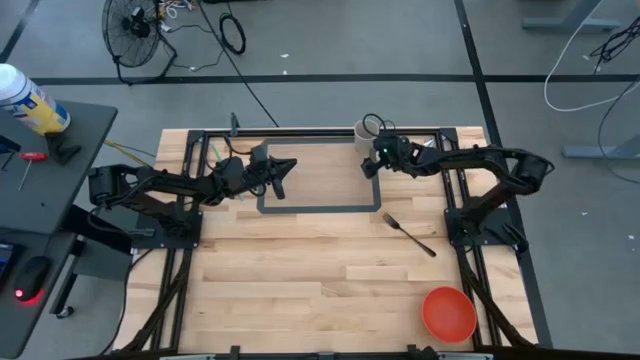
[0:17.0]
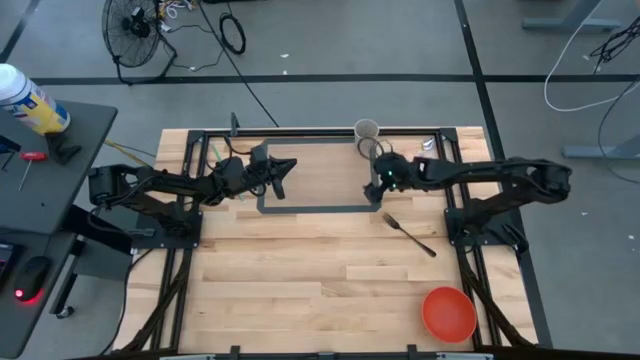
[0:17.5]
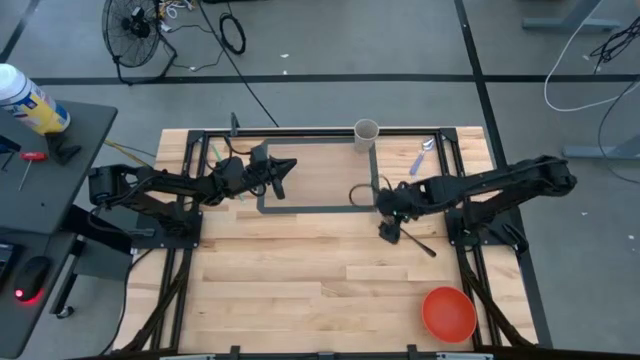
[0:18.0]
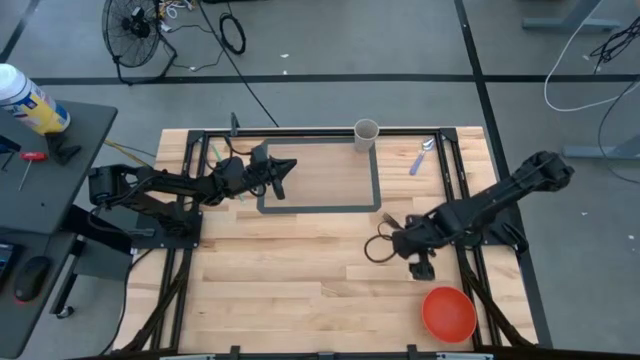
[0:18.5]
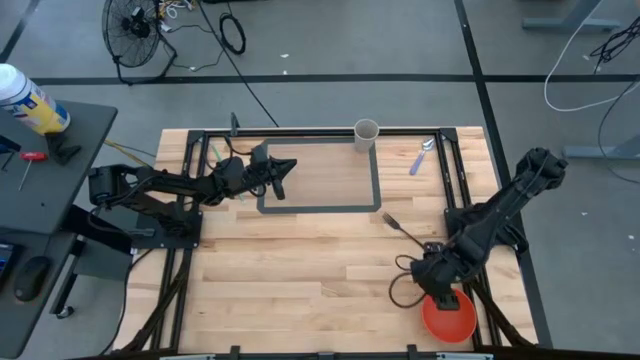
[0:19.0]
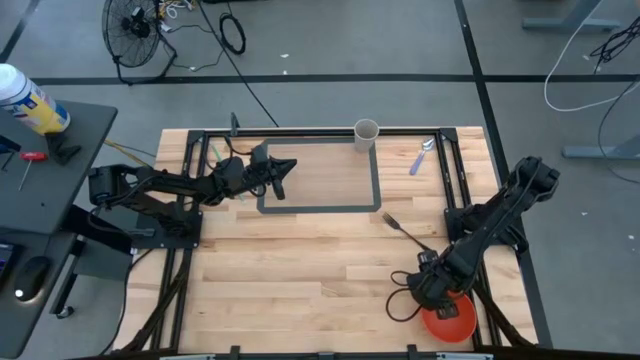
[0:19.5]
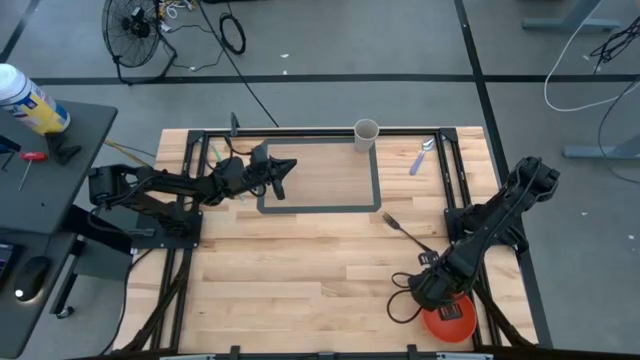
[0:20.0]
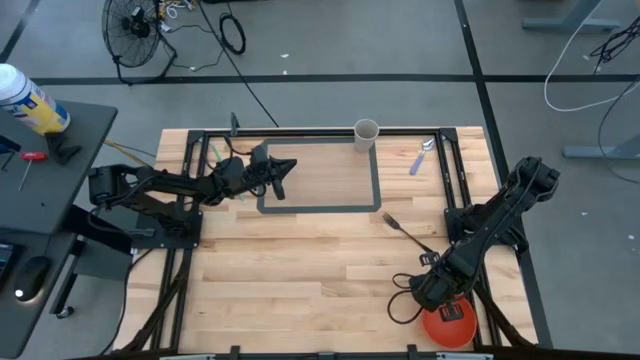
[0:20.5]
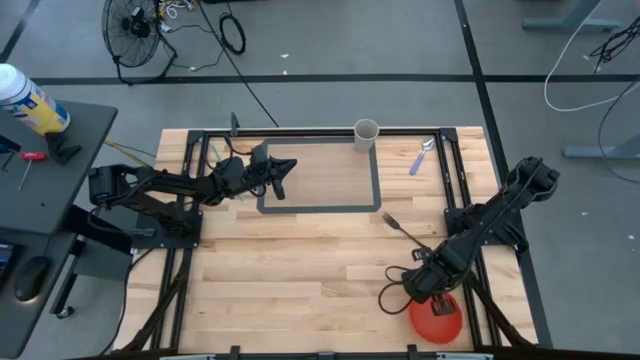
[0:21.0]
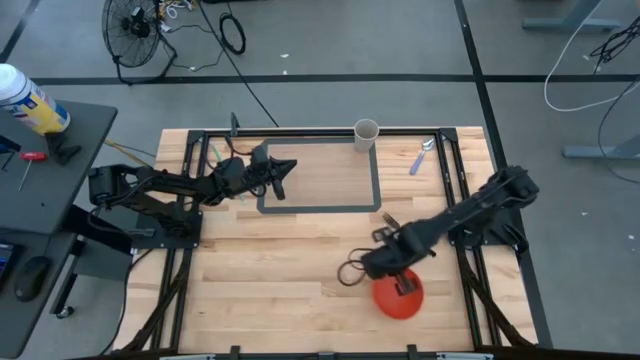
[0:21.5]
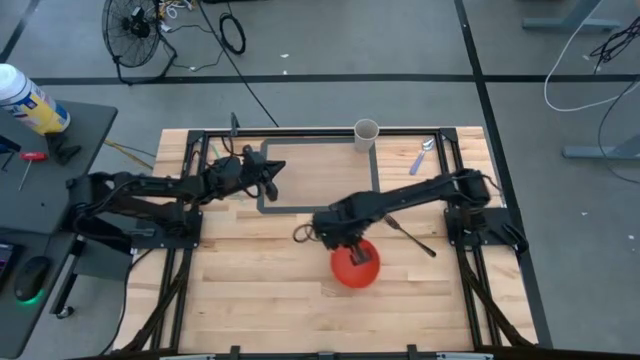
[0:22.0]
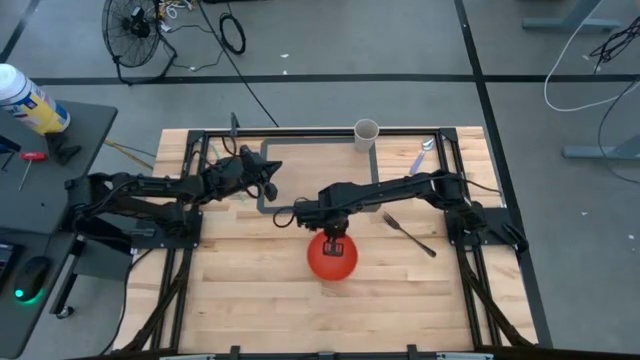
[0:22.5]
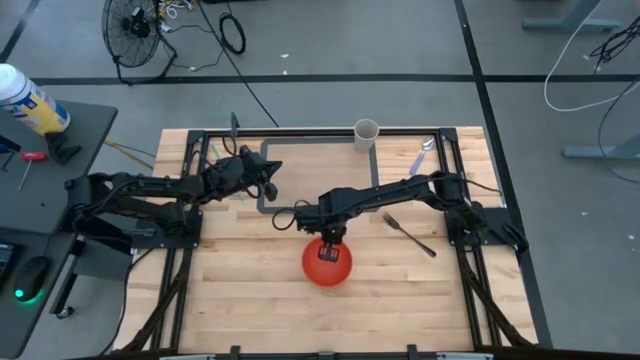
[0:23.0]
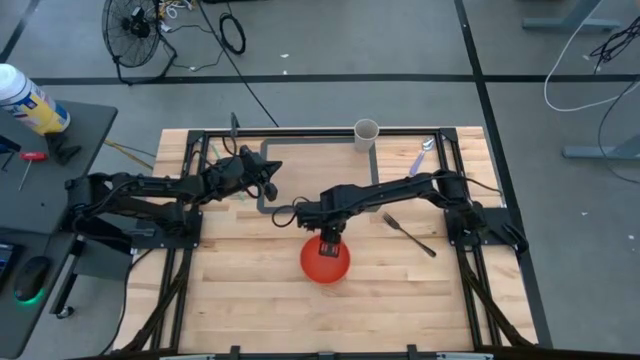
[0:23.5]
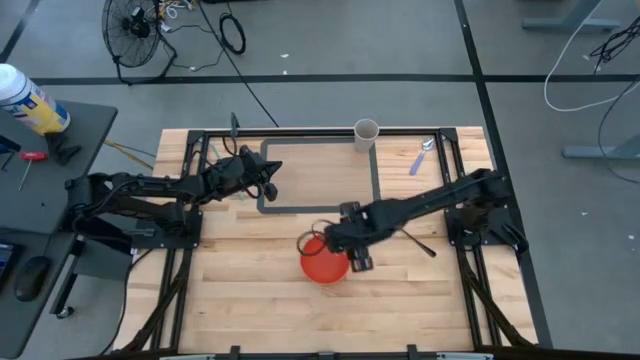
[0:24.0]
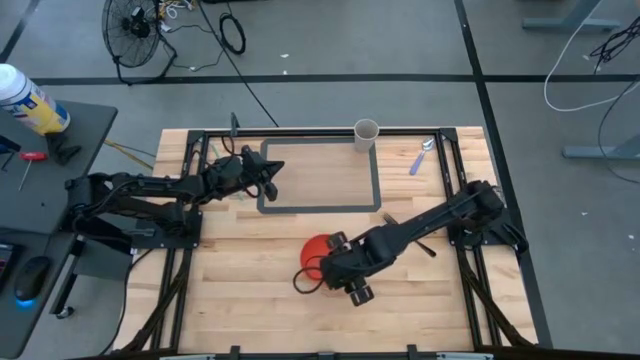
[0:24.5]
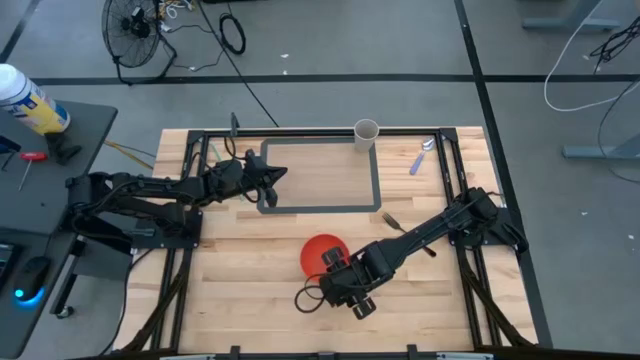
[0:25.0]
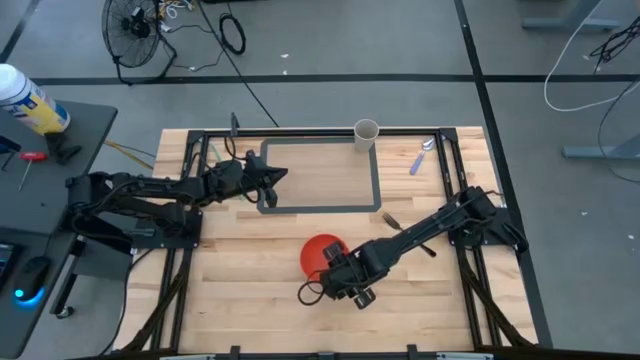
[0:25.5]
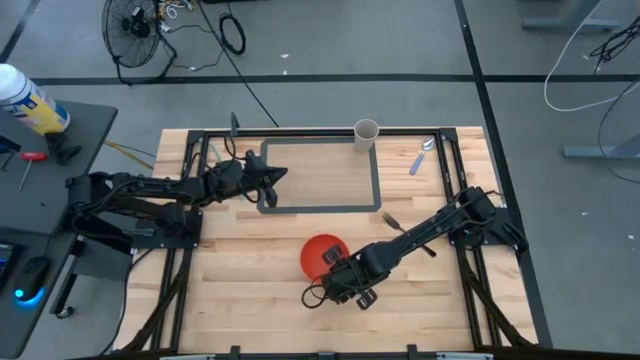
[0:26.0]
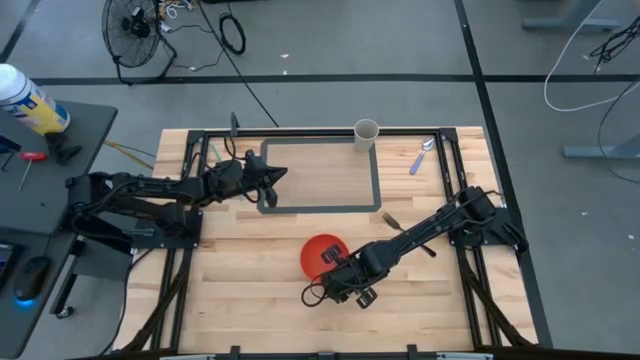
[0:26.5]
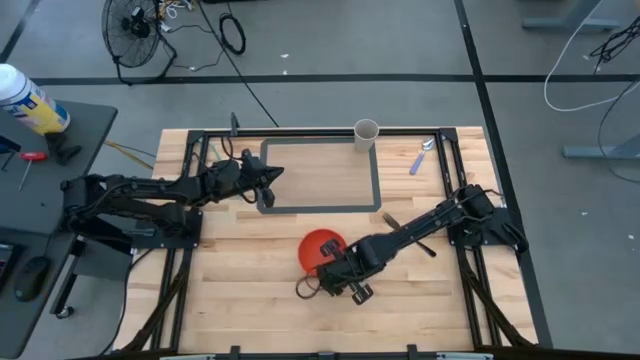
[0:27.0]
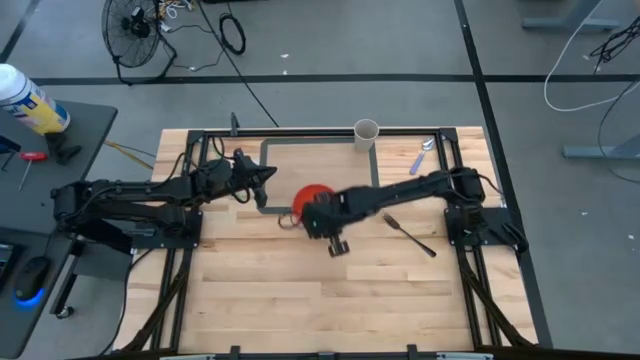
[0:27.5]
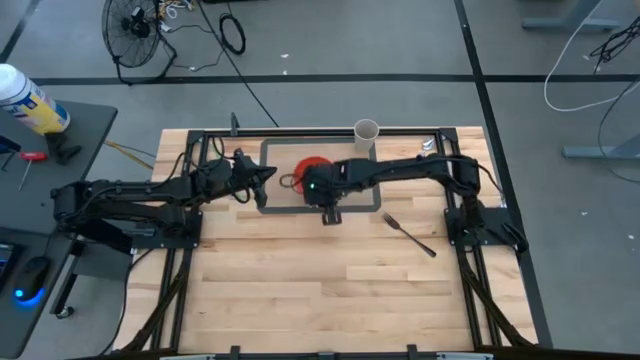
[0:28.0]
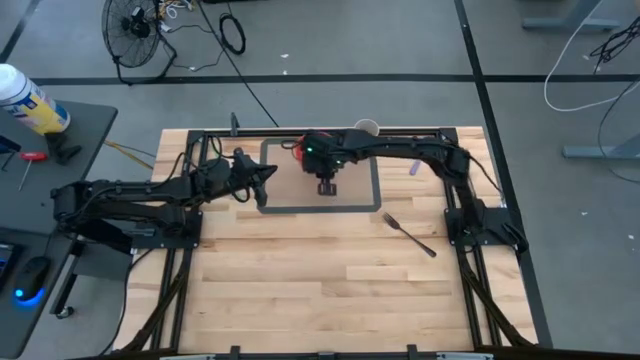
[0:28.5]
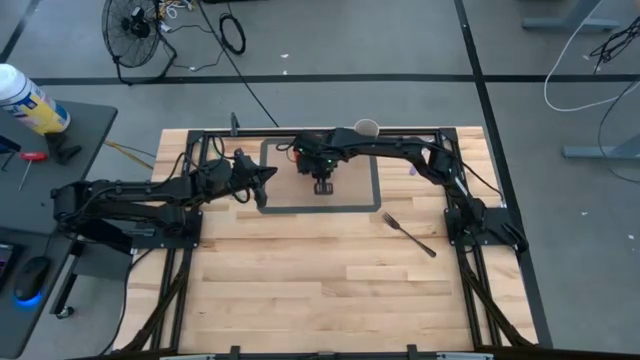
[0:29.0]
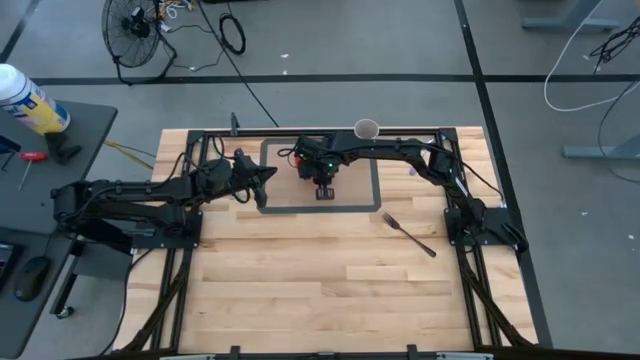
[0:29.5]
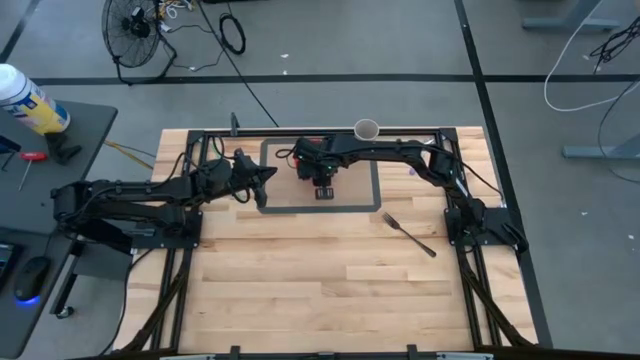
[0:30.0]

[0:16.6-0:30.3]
Task: Pick & Place Utensil
Put the orange bowl on the transparent mat
